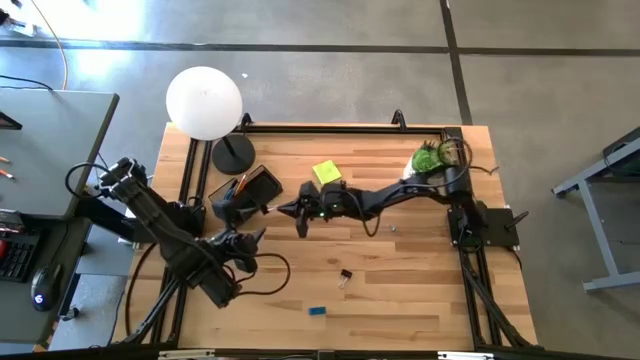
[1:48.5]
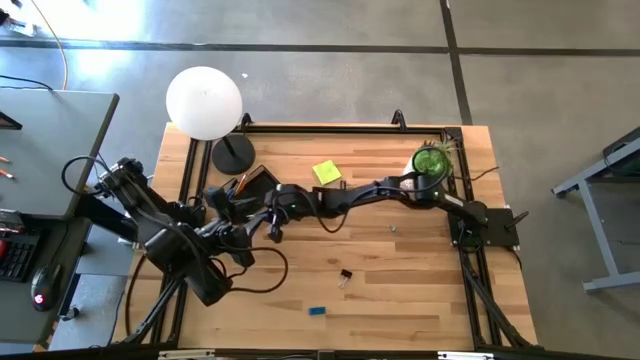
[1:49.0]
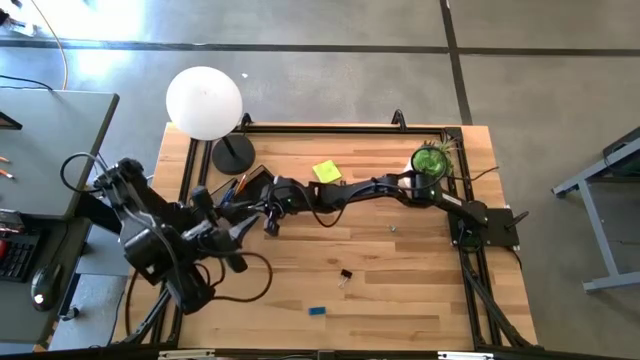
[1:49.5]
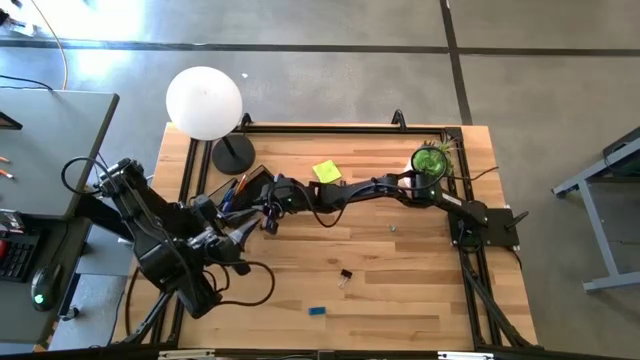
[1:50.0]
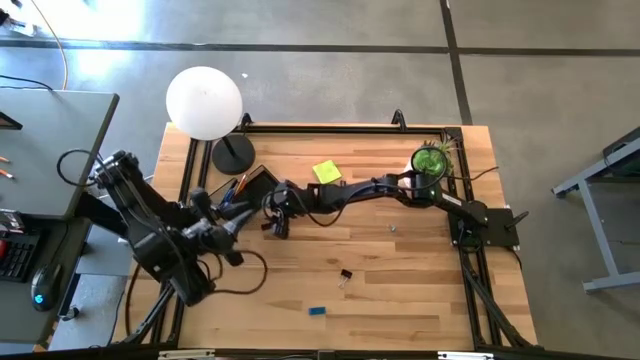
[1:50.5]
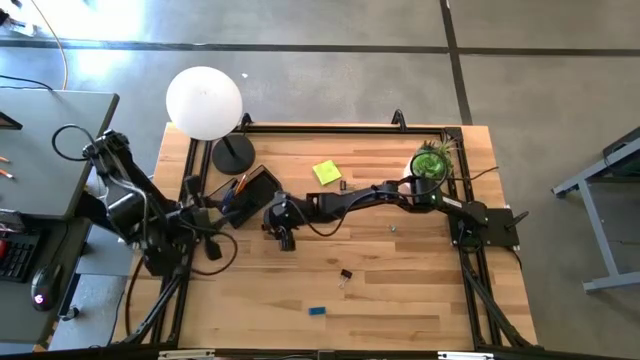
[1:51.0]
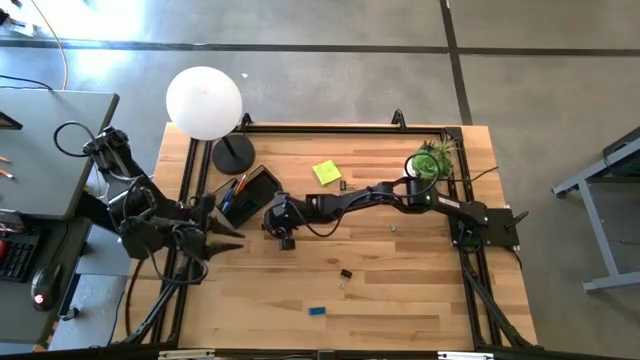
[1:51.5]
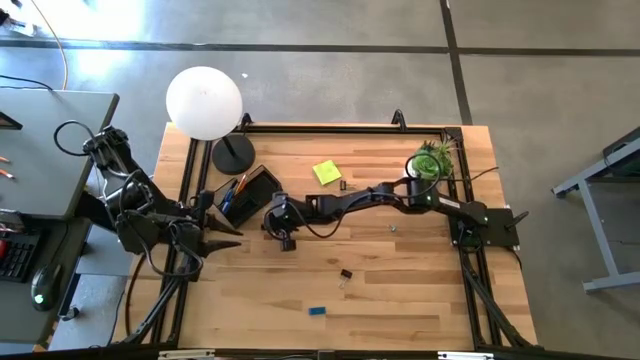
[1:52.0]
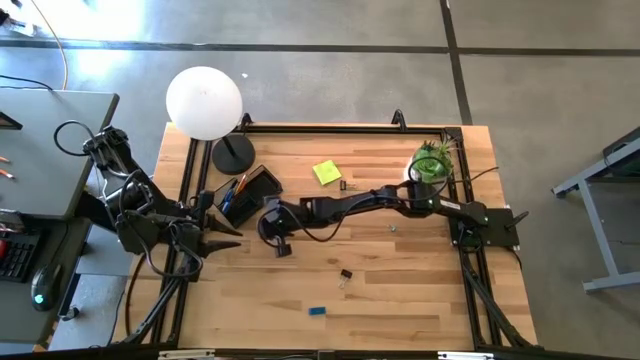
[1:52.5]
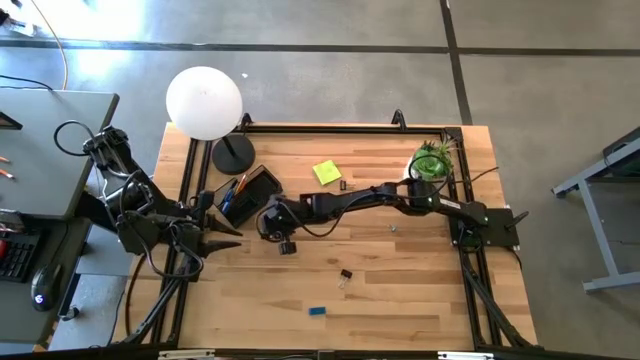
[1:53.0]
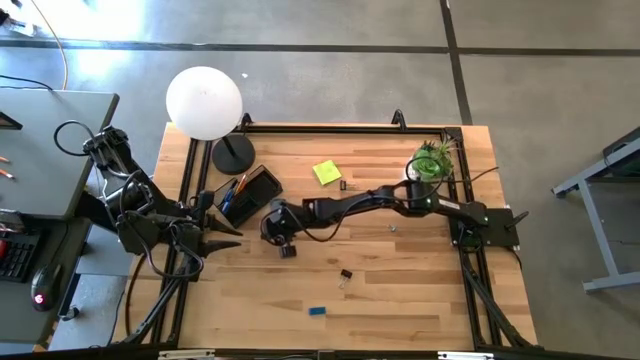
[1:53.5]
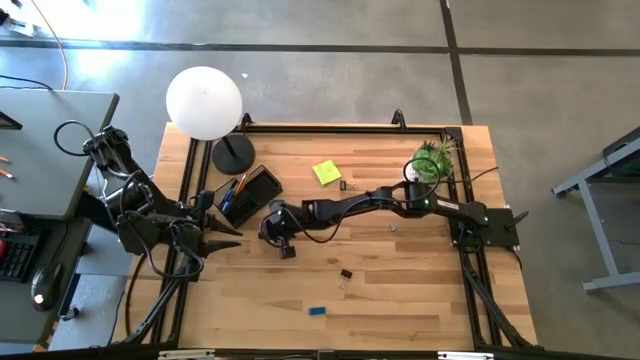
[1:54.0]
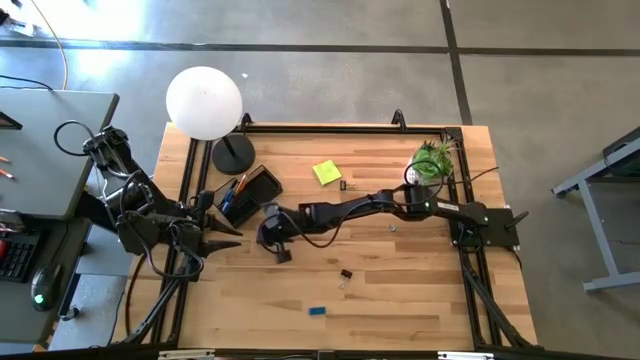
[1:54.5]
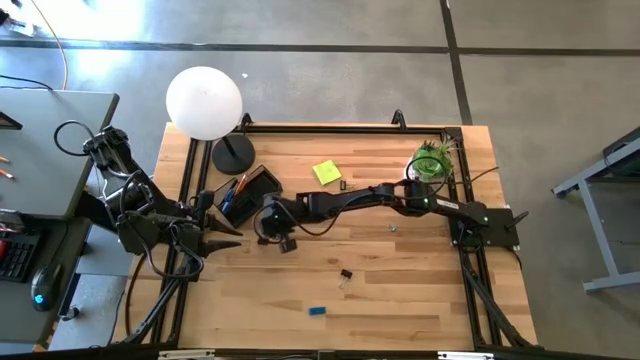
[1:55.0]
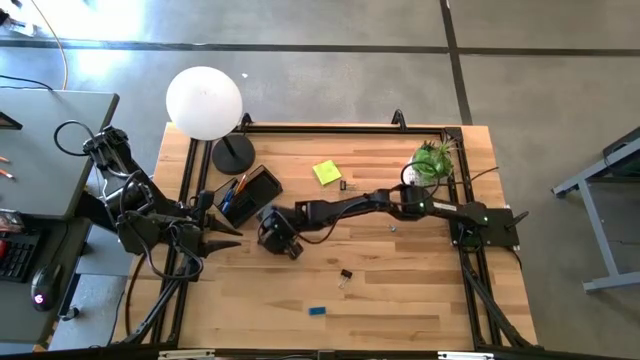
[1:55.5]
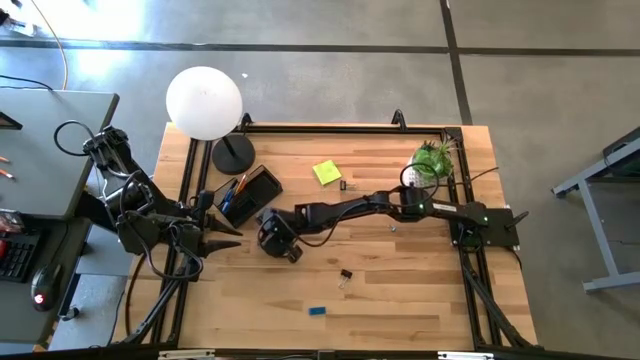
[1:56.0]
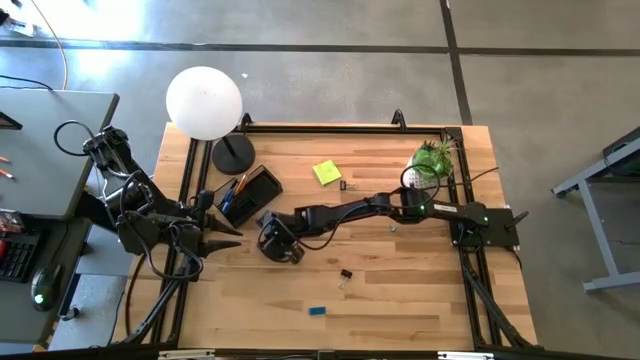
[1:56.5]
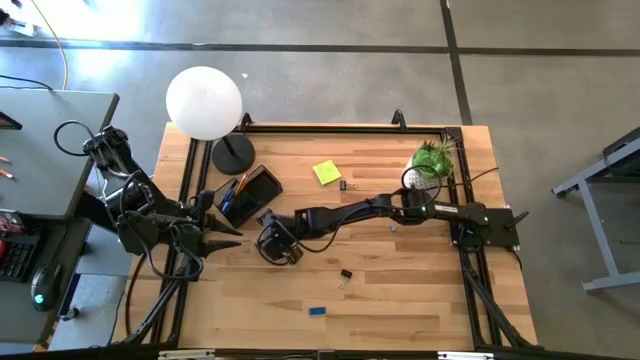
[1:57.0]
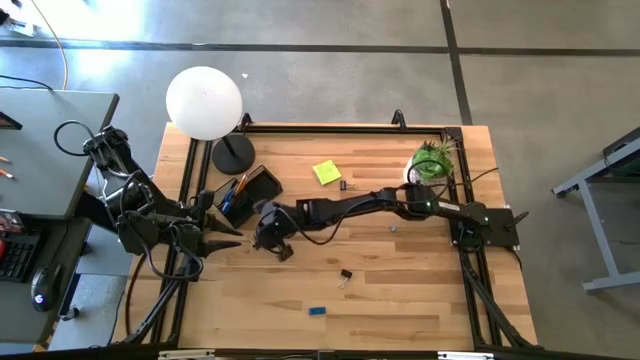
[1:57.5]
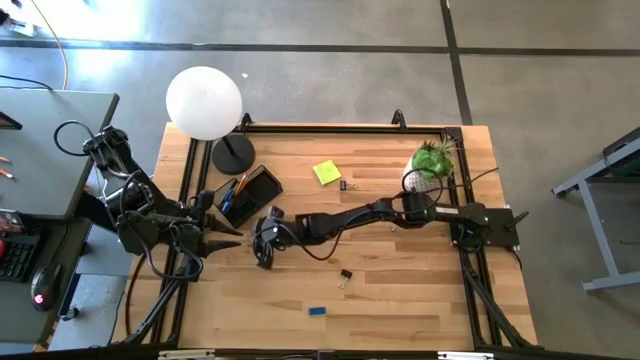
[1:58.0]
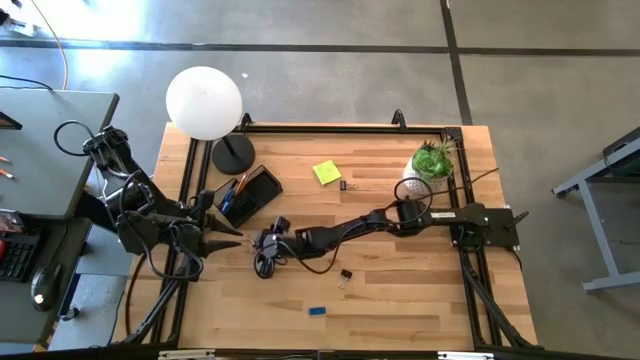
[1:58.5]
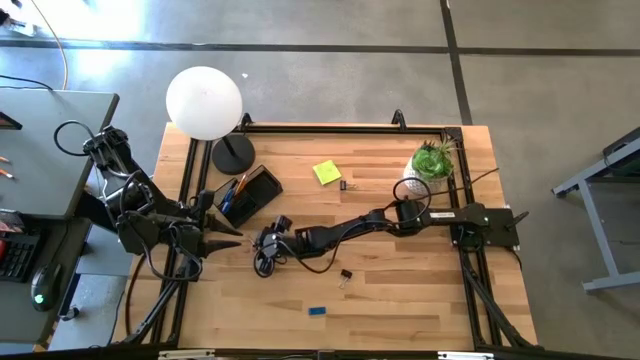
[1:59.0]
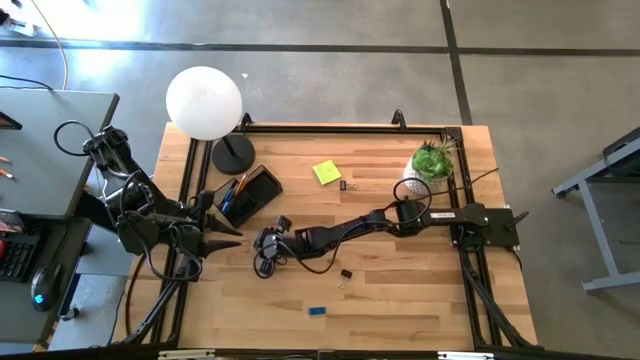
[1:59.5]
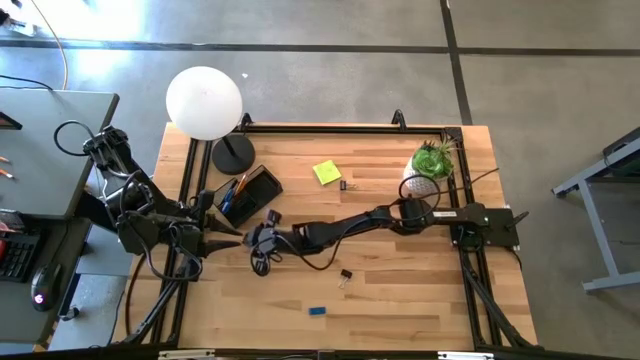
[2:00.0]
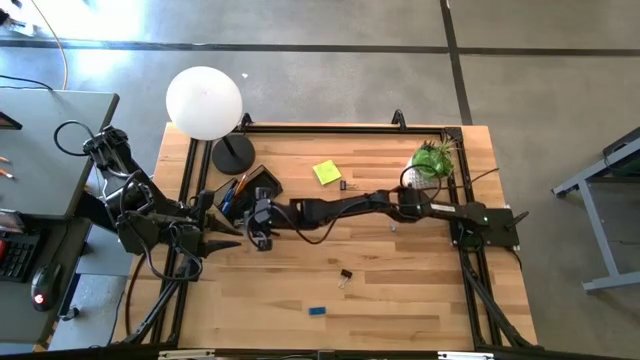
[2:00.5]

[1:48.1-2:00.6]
Task: Pick and place office supplies into organizer
Put the left black binder clip into the black mesh desk organizer

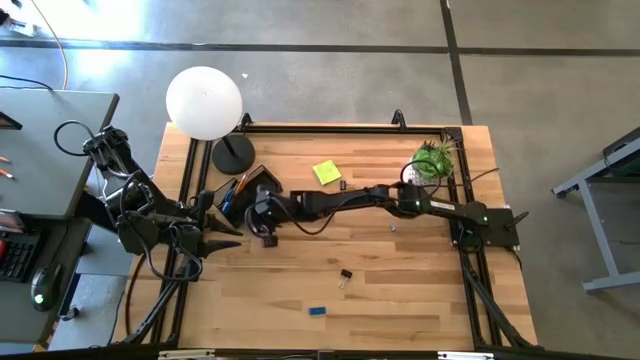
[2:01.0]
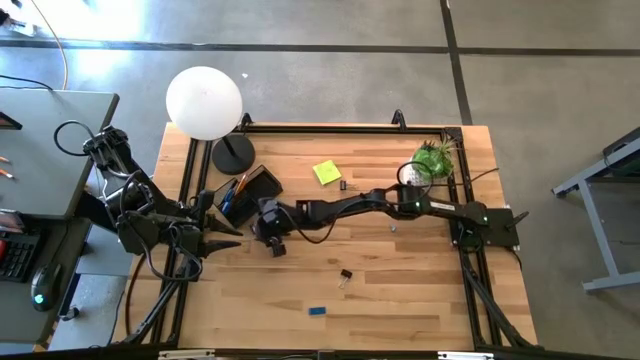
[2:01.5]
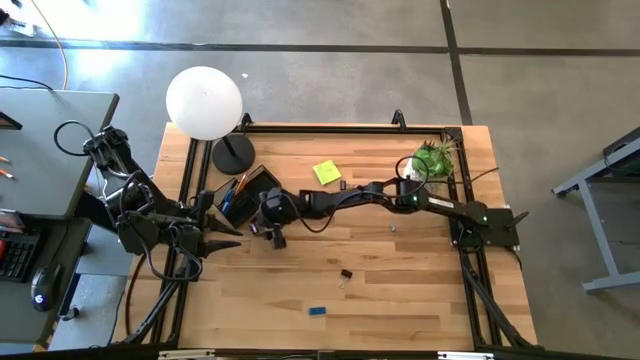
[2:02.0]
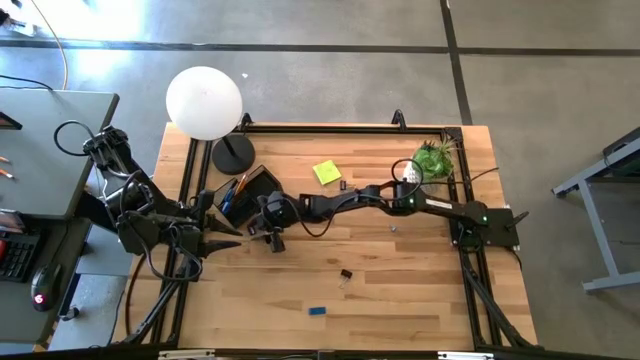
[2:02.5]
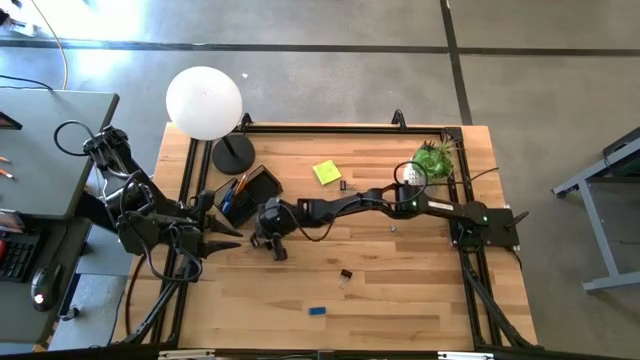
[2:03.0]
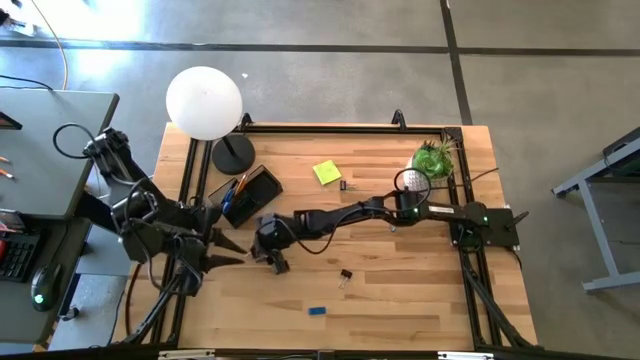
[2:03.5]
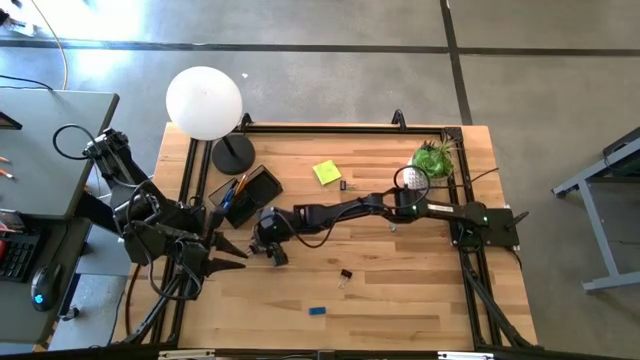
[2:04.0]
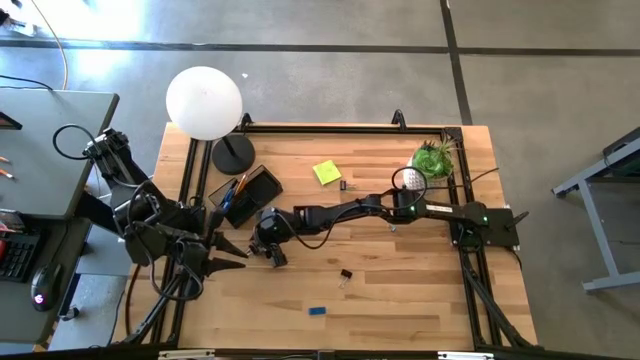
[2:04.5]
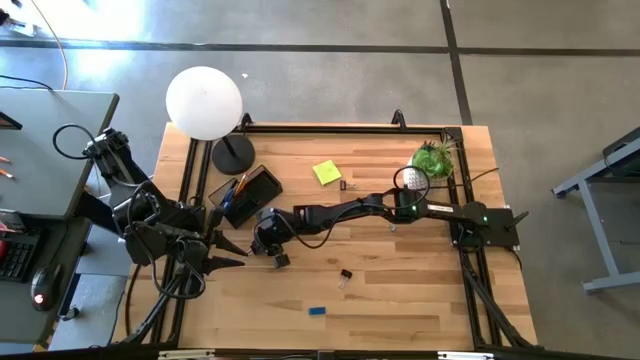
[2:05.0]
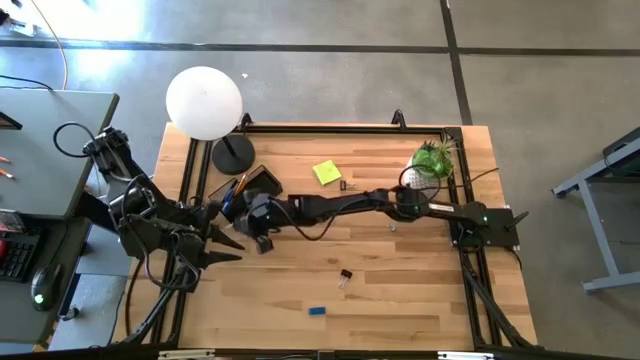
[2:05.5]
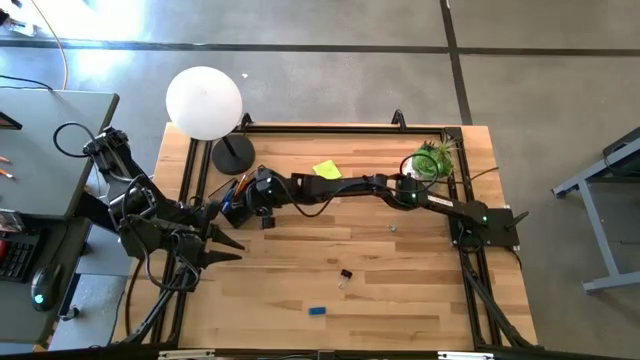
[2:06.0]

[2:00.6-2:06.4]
Put the left black binder clip into the black mesh desk organizer

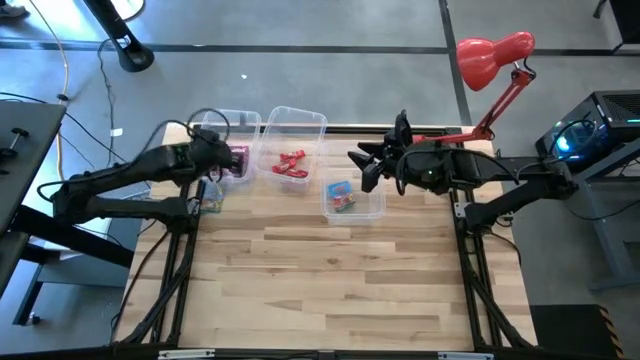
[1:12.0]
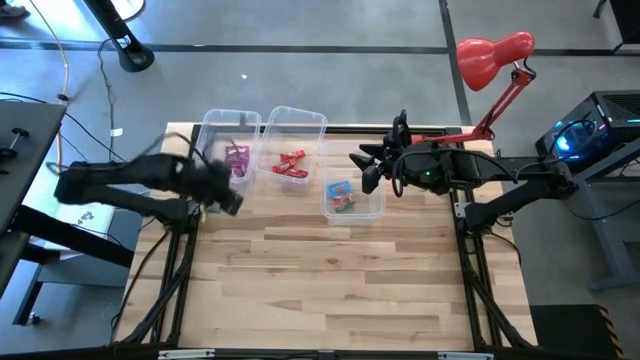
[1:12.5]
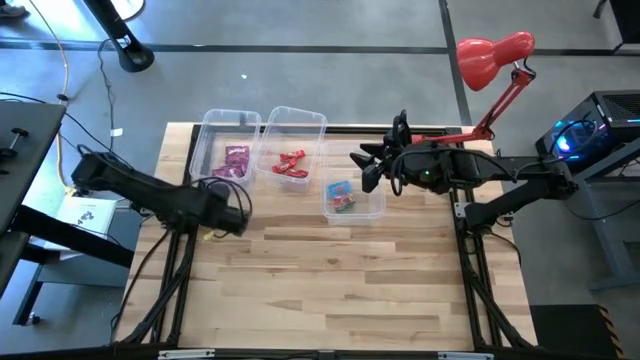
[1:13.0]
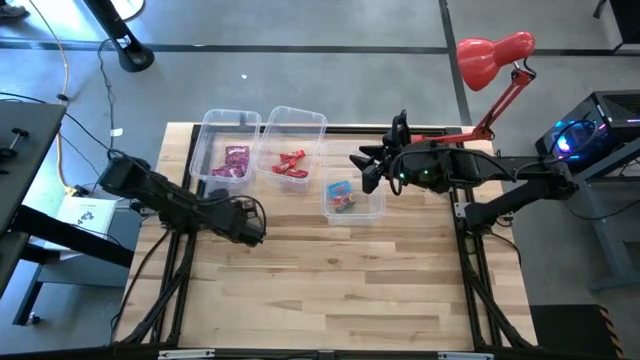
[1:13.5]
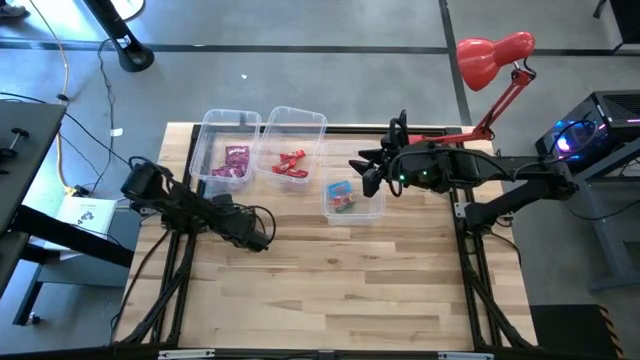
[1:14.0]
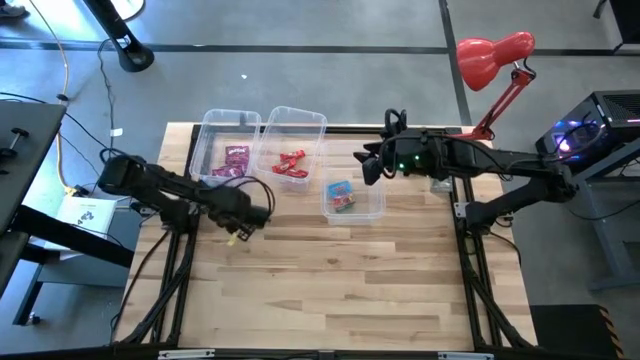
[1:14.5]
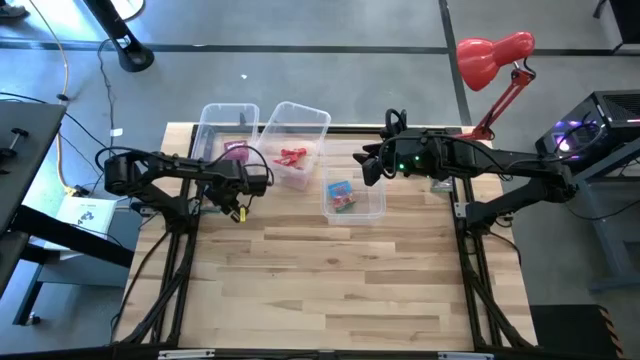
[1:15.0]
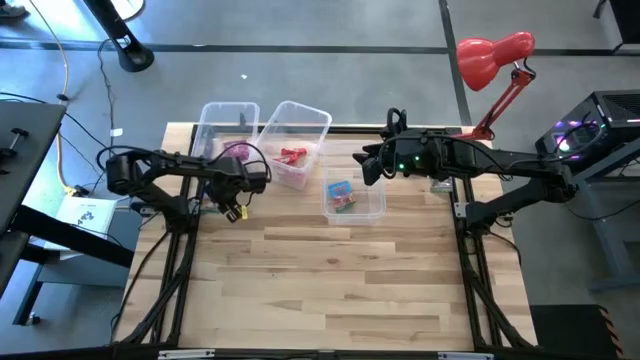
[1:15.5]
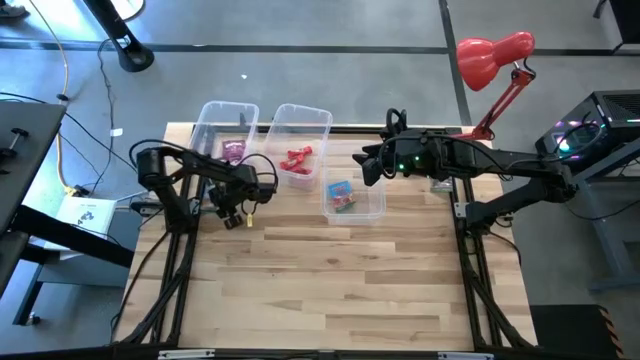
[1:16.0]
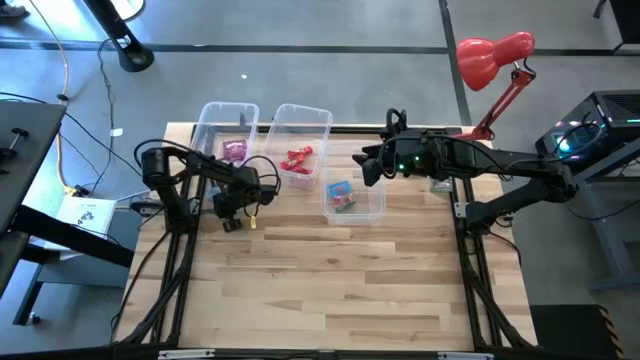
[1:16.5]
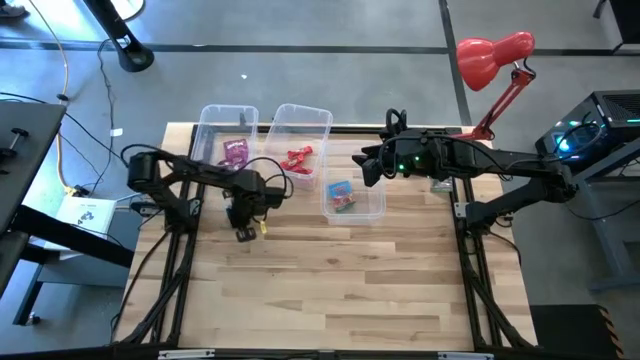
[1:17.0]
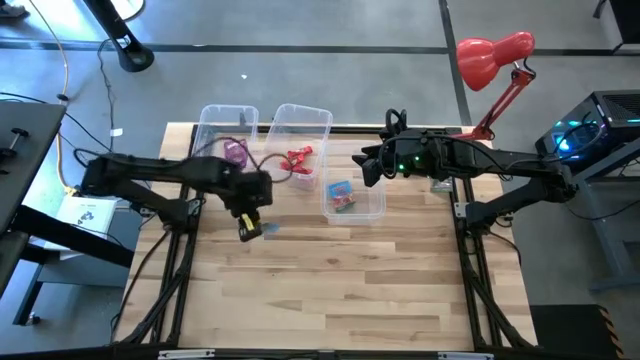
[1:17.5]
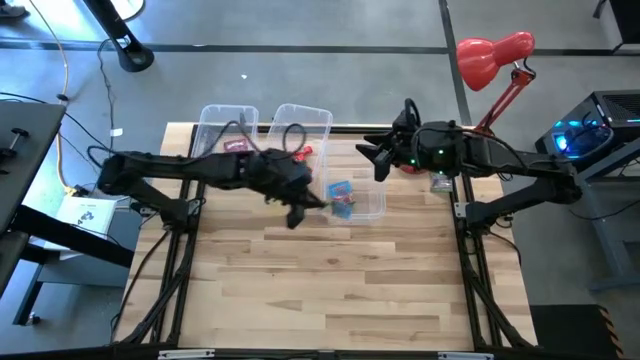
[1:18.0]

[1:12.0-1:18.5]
Task: Sort candy
Put the blue candy bag into the right transparent bin
